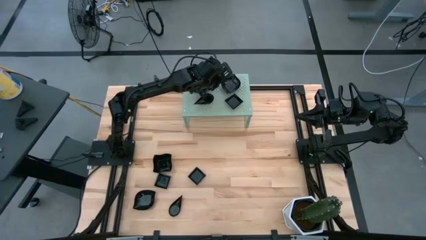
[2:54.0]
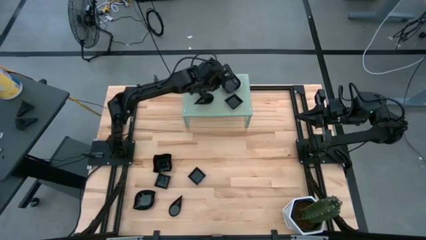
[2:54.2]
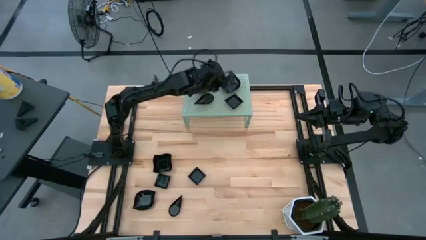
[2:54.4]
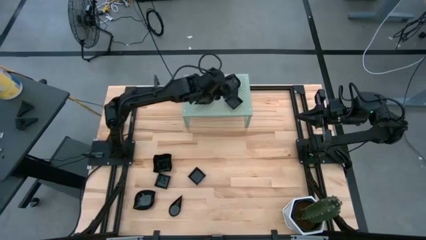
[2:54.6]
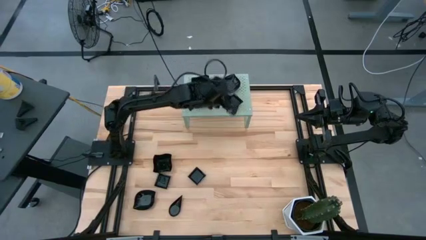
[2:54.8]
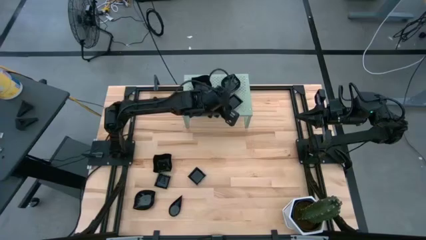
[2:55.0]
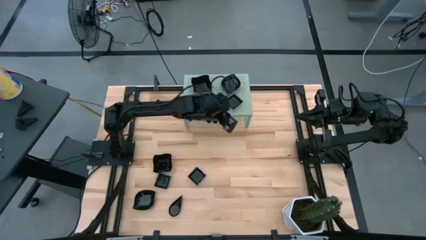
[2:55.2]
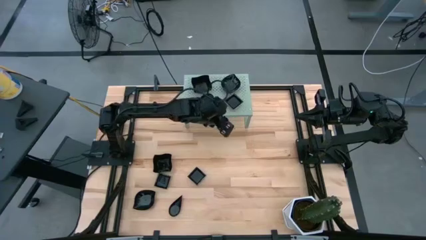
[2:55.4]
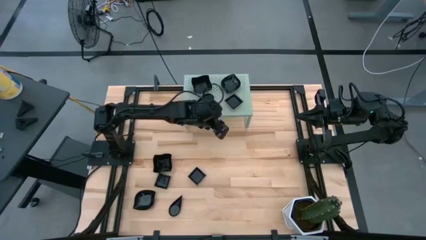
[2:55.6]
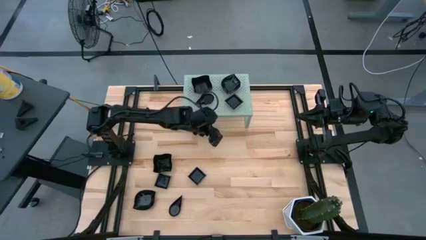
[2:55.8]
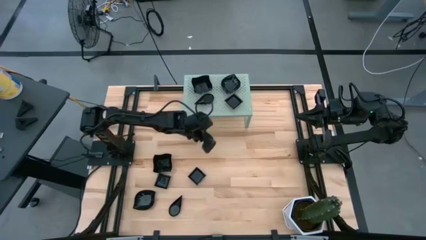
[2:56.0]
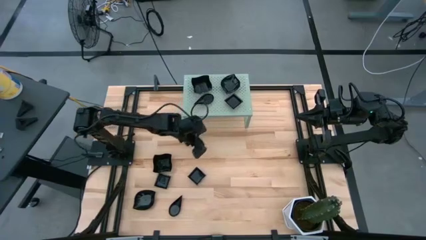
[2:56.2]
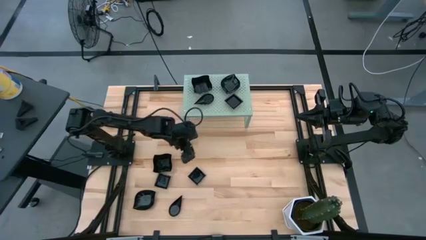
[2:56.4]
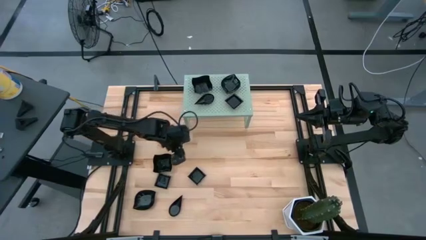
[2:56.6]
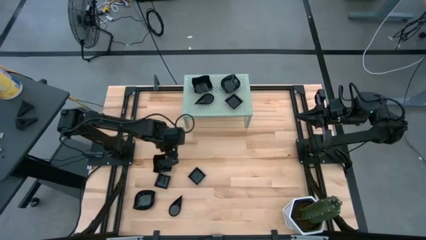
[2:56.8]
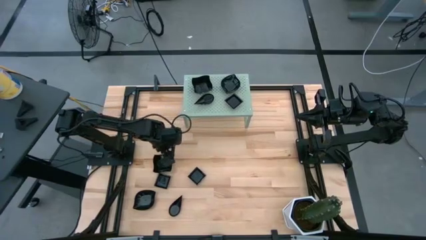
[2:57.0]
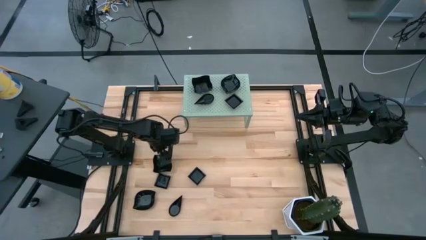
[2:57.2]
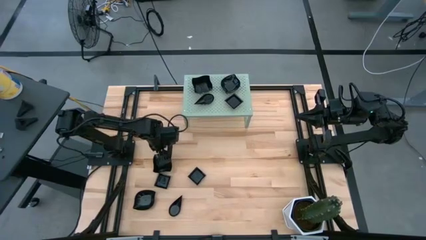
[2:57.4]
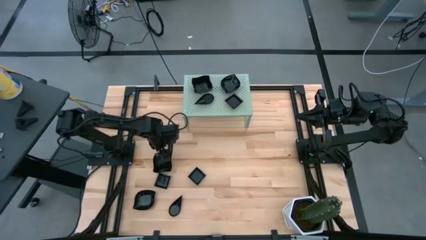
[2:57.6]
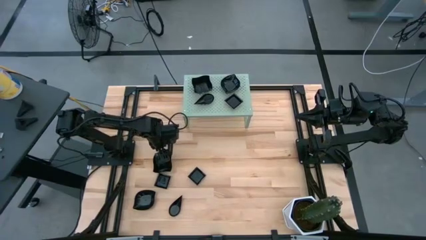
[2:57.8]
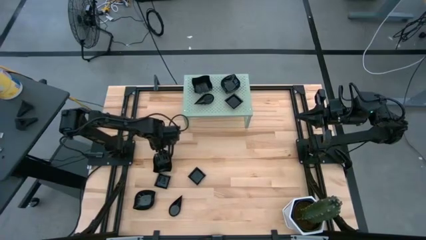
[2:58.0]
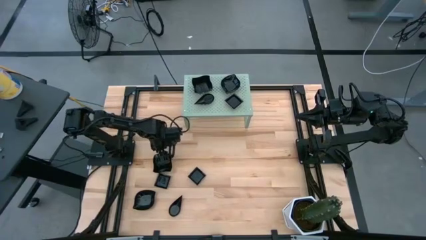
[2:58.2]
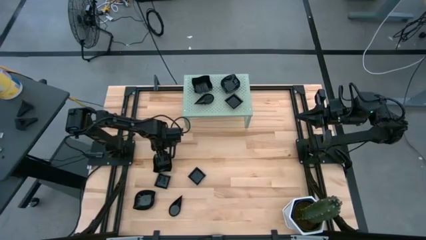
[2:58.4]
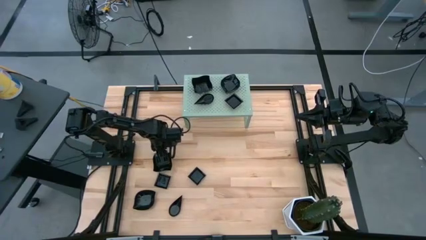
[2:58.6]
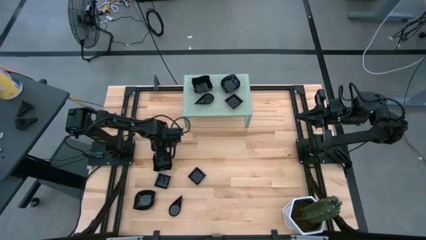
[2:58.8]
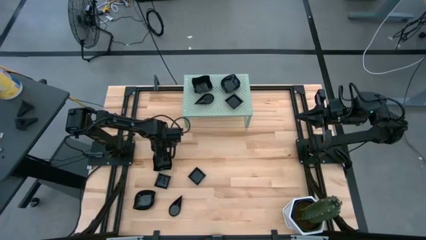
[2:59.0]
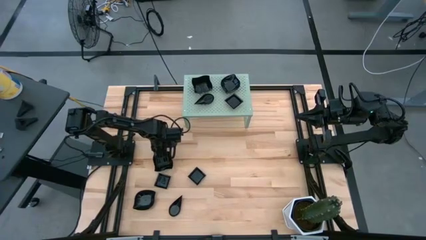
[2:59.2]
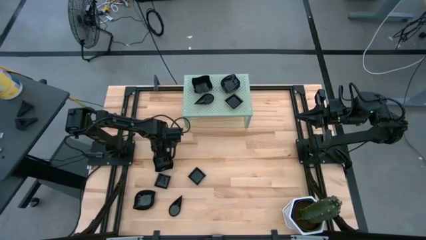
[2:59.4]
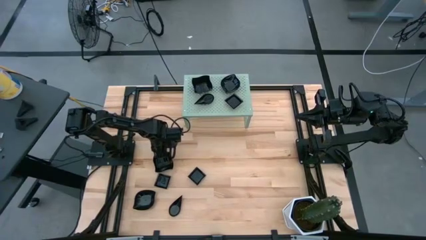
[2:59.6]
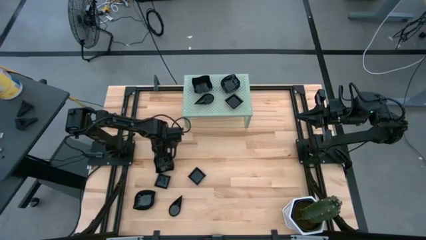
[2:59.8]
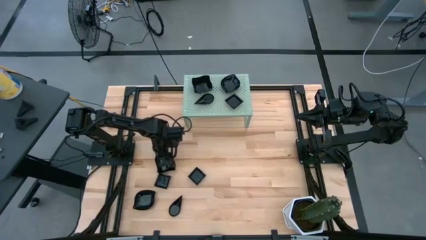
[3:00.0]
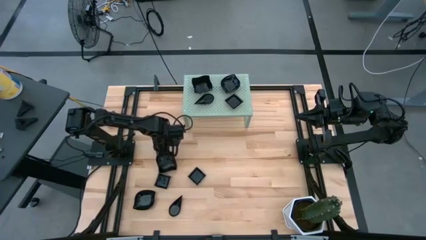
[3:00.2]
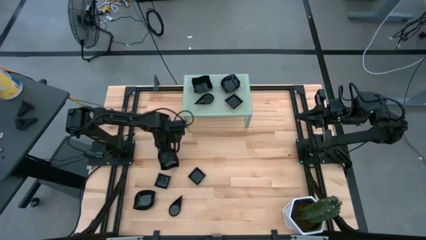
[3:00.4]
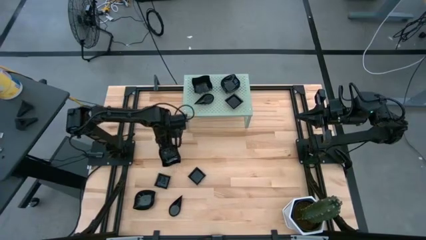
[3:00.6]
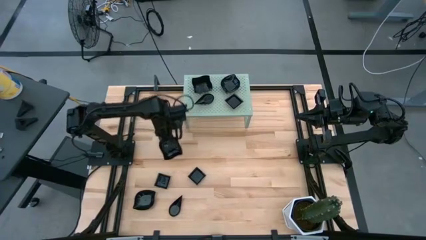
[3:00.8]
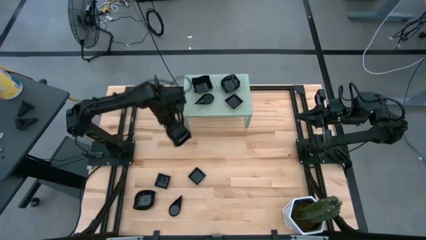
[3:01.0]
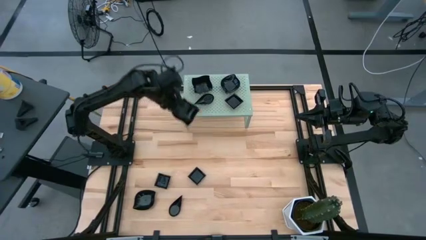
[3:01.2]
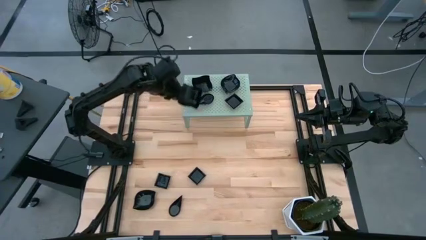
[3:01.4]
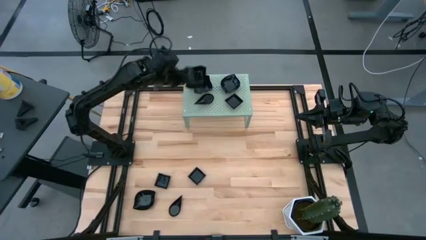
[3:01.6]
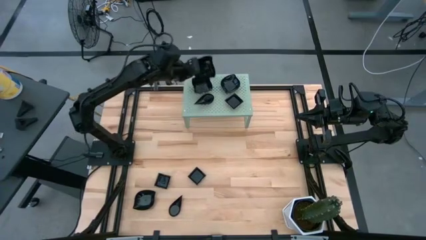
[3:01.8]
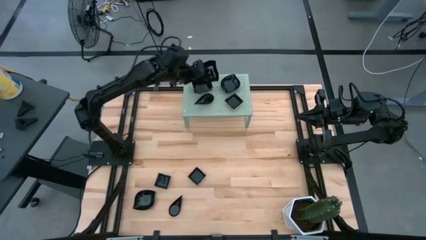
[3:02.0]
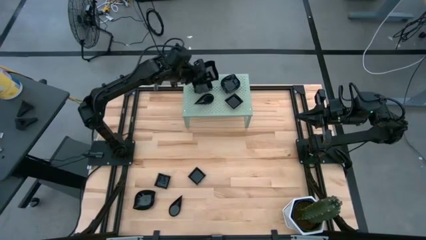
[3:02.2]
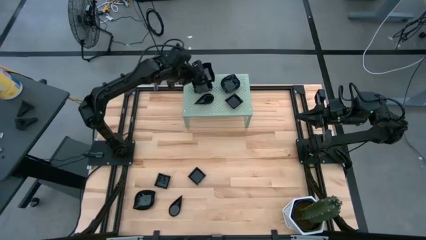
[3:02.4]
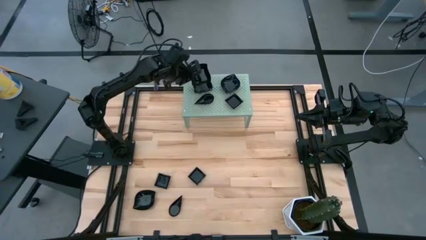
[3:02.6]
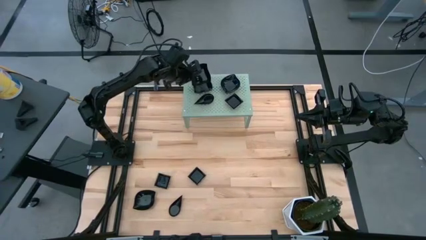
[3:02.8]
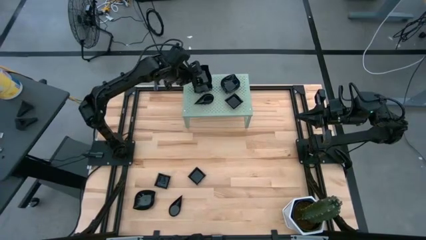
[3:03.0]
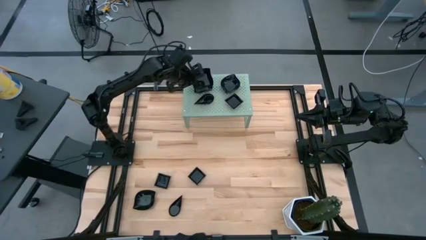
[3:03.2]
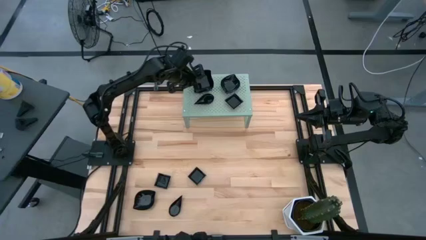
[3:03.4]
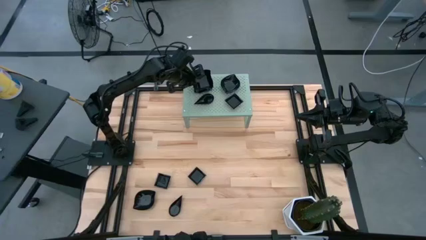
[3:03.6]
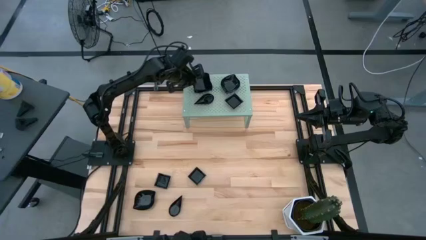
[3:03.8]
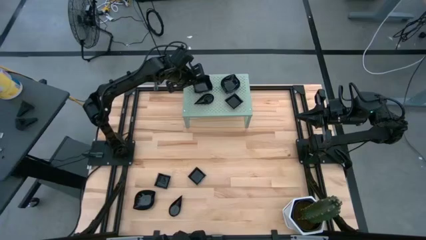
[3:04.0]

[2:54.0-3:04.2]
Task: Pick & Place Mini shaped plates
Stack the distorted square plate on top of the distorted square plate on the shelf

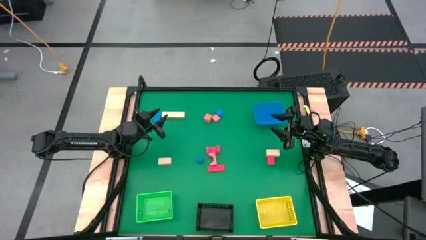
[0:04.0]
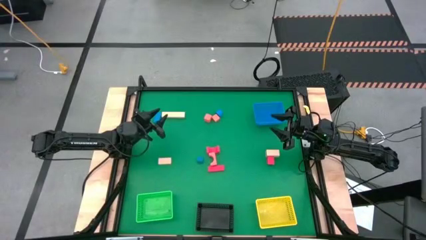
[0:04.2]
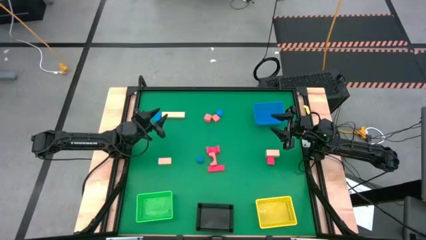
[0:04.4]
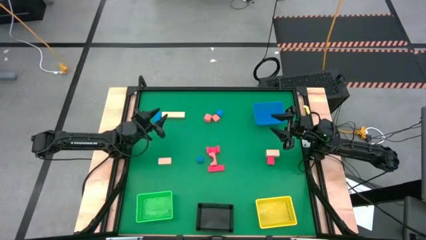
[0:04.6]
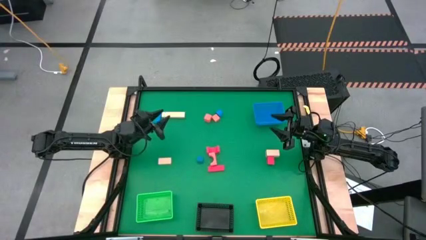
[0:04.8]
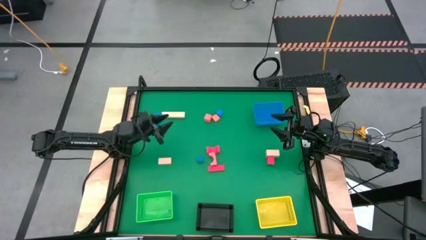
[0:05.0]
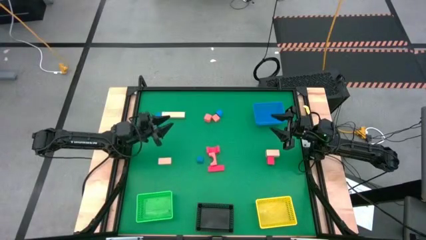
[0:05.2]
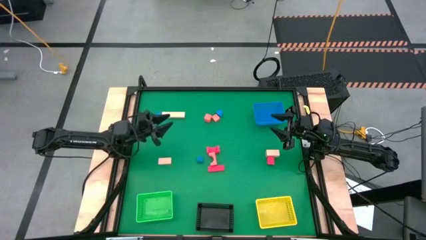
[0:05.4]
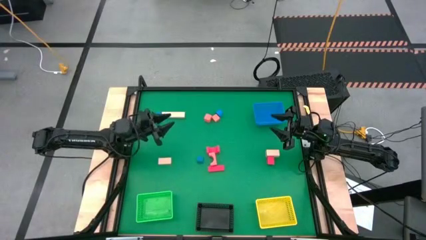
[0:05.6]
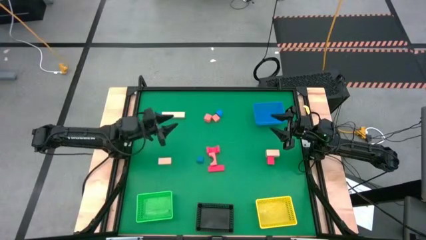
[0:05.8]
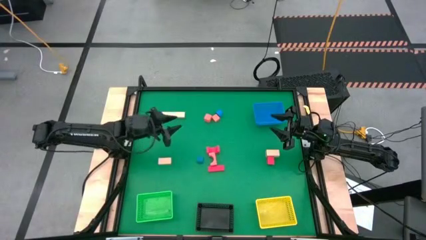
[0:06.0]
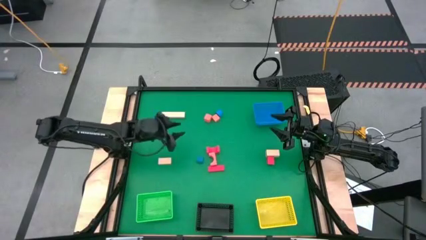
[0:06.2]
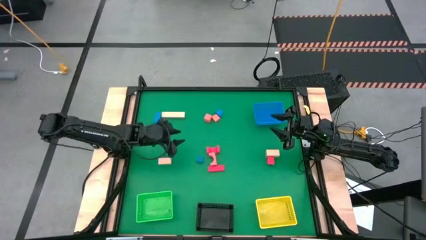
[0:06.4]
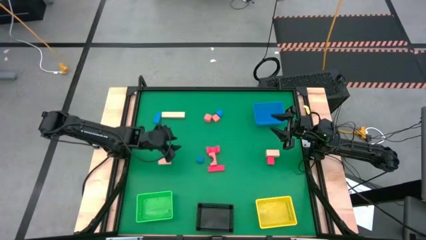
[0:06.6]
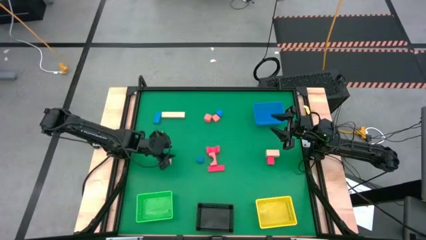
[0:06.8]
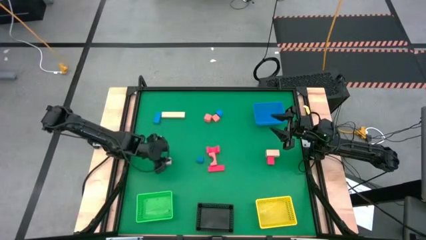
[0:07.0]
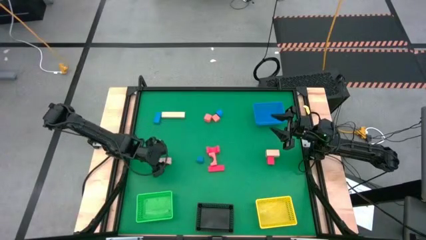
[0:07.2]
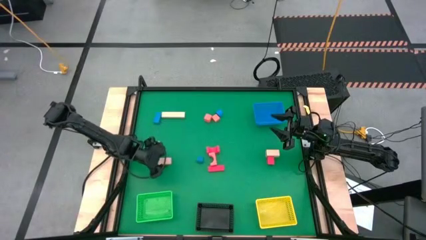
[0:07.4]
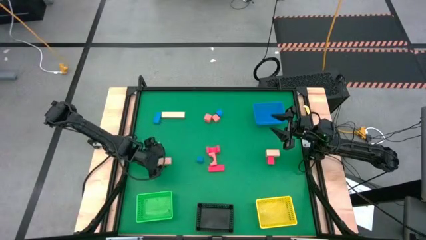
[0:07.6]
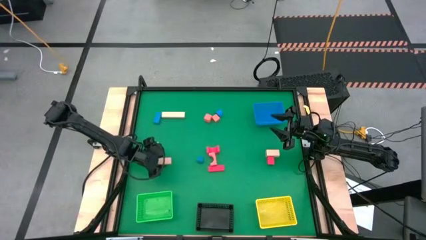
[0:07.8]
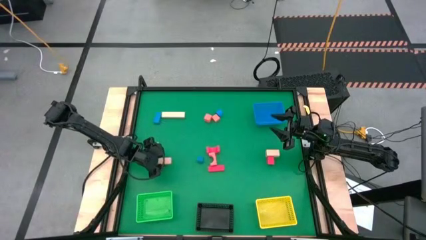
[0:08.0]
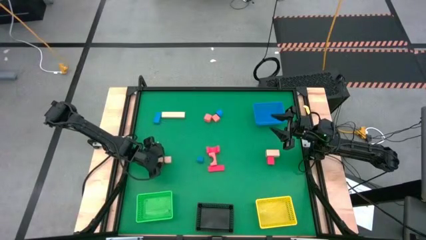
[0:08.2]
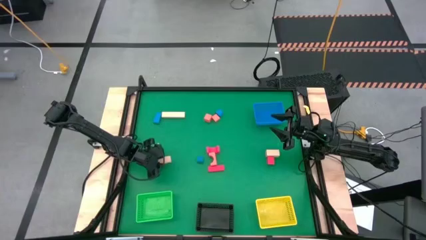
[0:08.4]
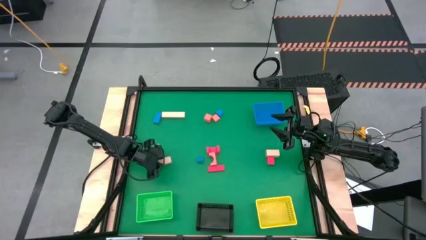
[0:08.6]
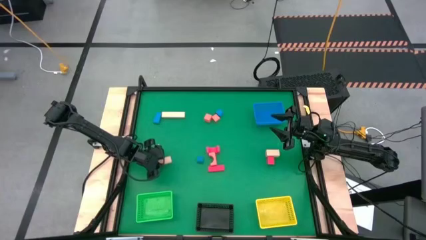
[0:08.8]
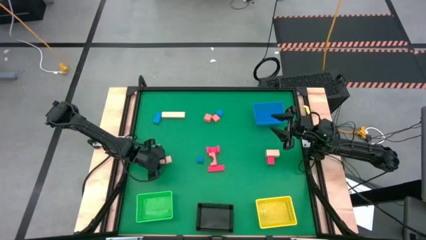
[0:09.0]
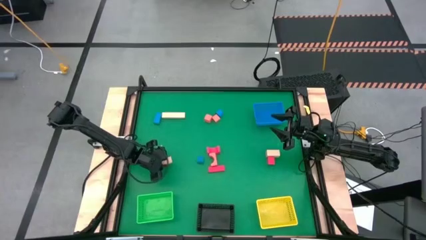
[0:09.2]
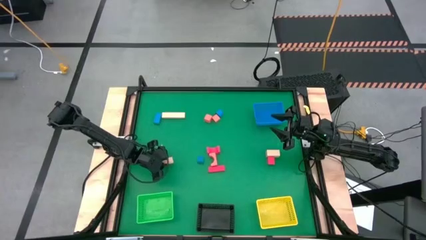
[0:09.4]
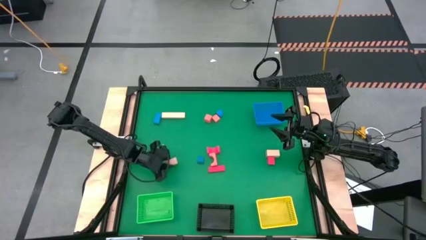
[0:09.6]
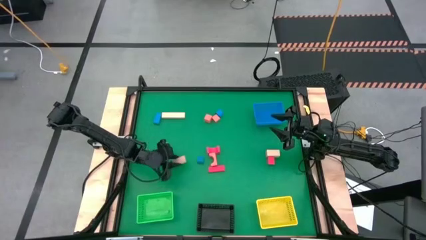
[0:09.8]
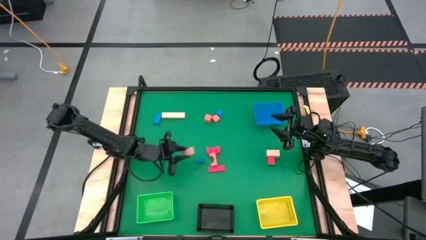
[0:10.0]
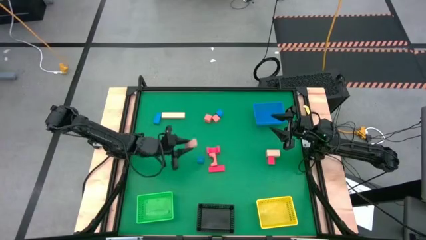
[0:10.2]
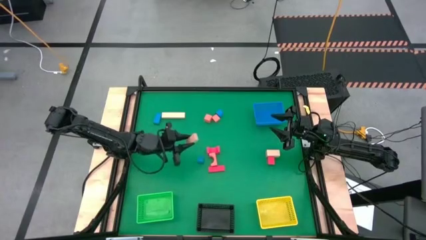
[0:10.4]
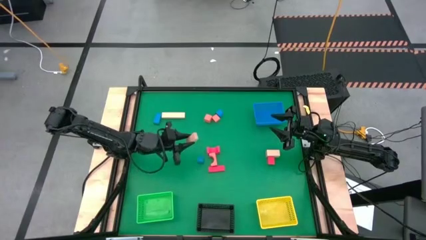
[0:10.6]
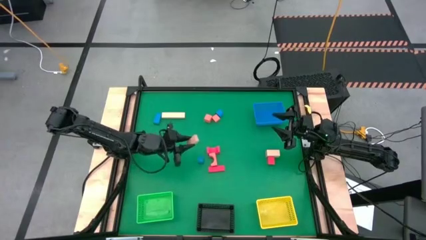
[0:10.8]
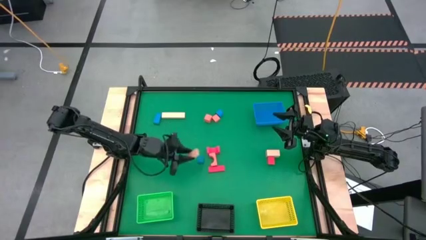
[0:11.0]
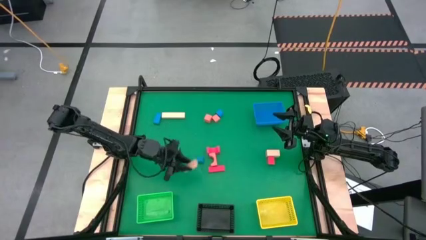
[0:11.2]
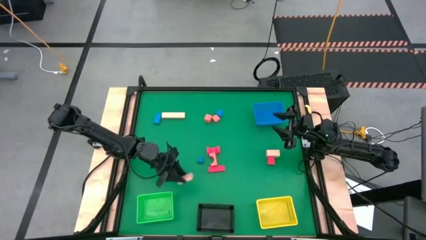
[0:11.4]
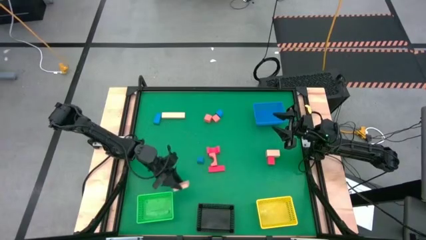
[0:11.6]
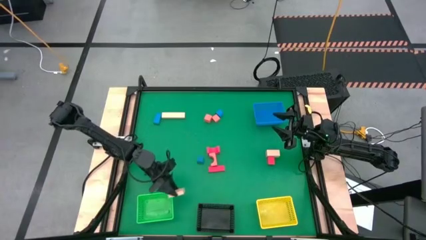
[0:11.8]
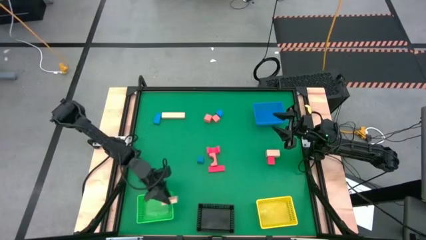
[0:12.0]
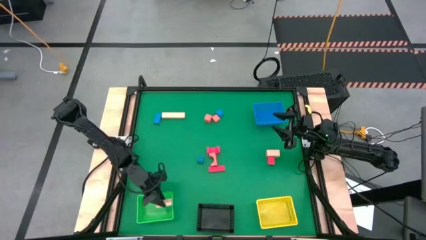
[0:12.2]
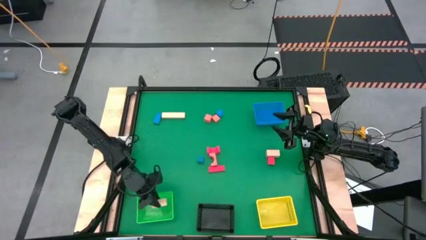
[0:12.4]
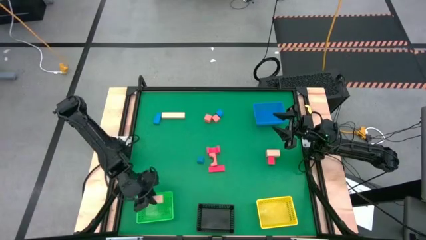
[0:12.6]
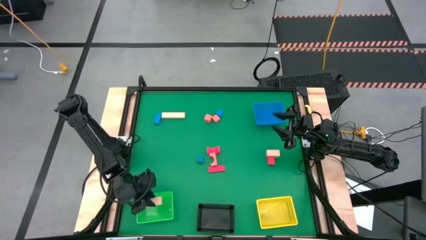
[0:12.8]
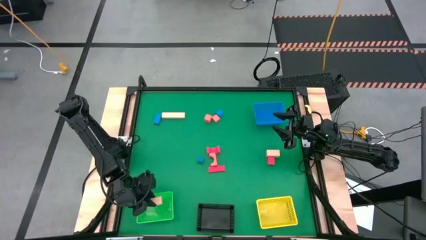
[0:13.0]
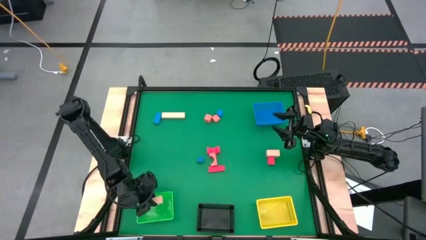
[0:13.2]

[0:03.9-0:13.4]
Task: Sort & place blocks by color
Put the light brown block into the green bin
